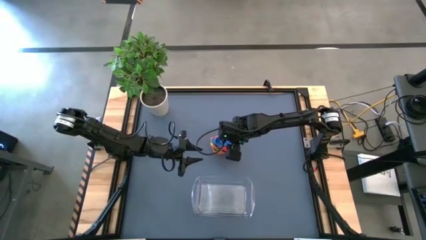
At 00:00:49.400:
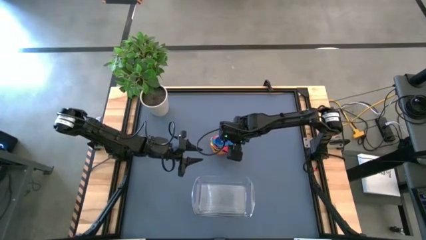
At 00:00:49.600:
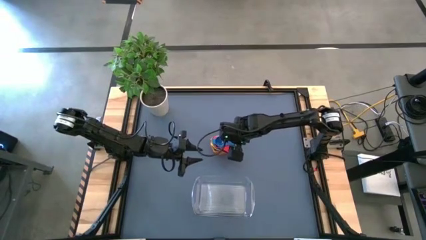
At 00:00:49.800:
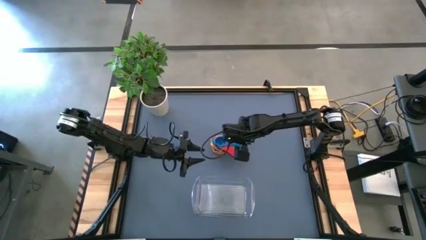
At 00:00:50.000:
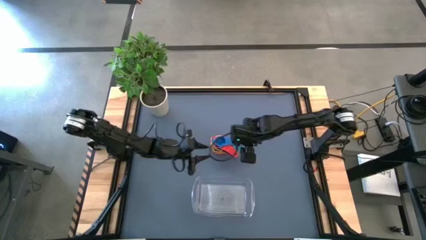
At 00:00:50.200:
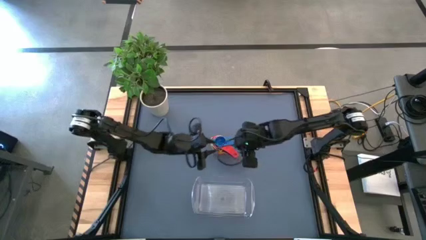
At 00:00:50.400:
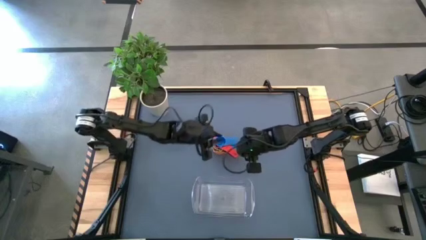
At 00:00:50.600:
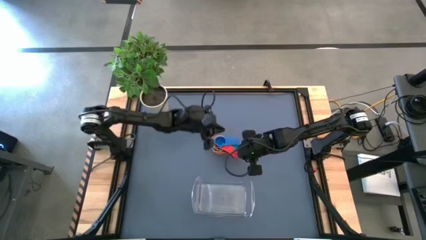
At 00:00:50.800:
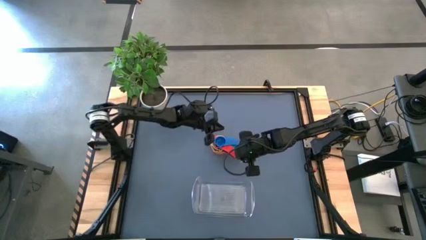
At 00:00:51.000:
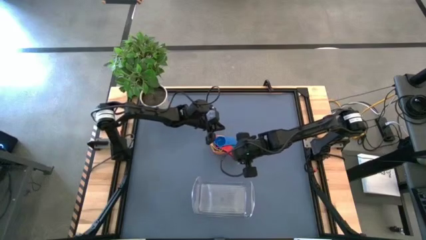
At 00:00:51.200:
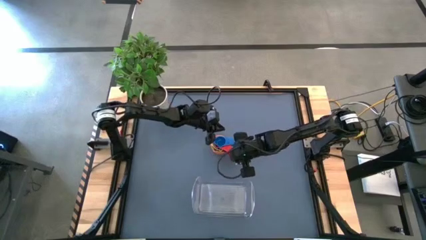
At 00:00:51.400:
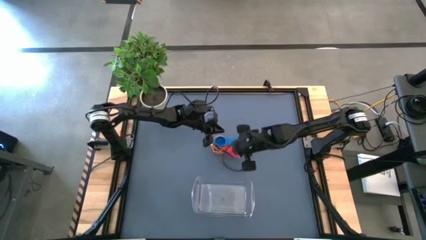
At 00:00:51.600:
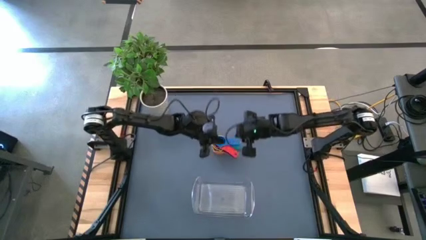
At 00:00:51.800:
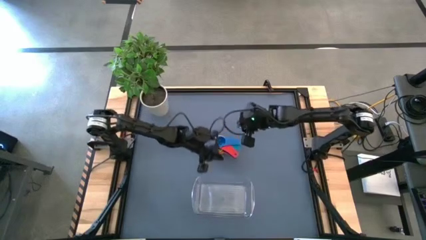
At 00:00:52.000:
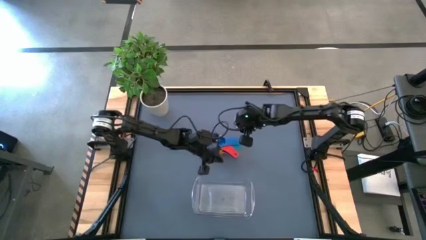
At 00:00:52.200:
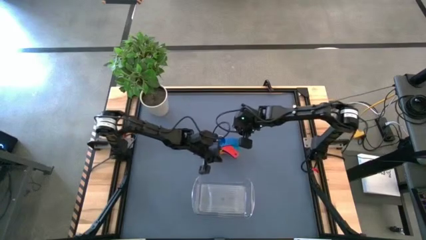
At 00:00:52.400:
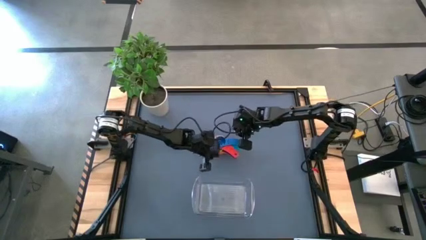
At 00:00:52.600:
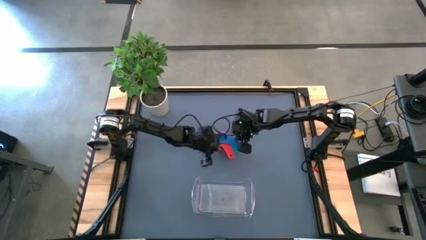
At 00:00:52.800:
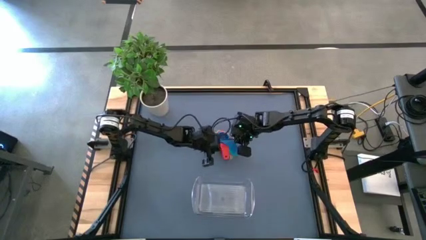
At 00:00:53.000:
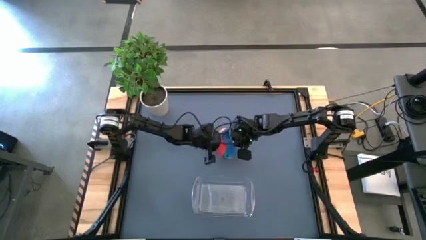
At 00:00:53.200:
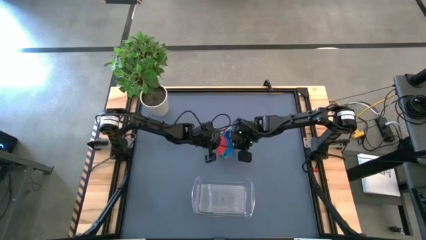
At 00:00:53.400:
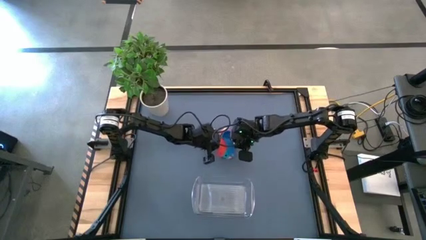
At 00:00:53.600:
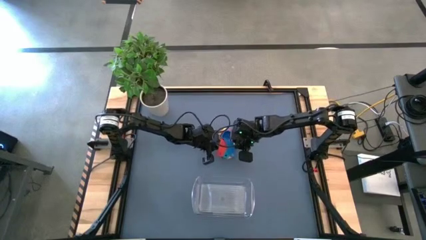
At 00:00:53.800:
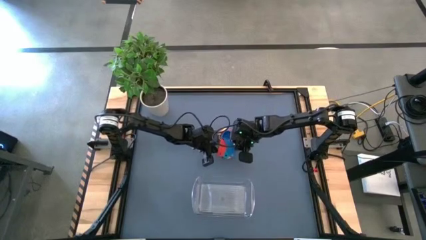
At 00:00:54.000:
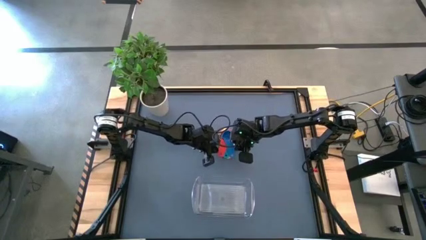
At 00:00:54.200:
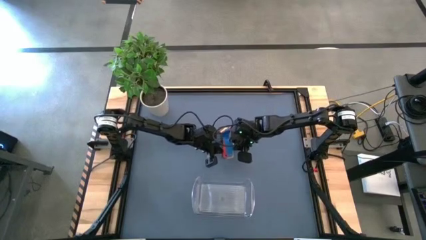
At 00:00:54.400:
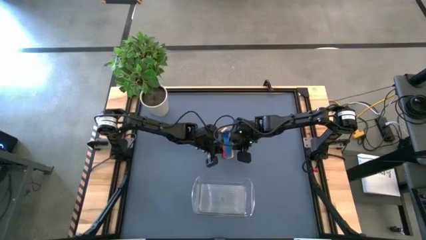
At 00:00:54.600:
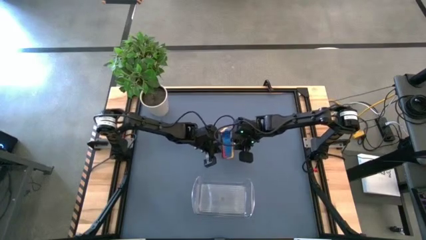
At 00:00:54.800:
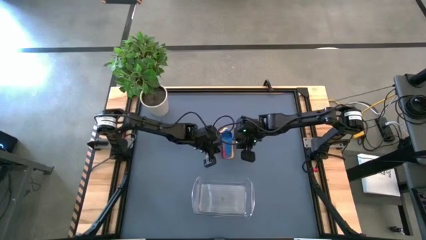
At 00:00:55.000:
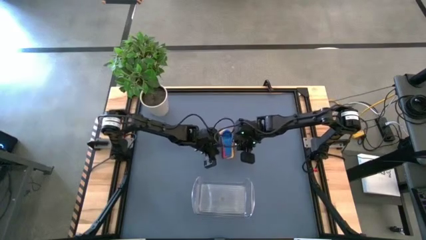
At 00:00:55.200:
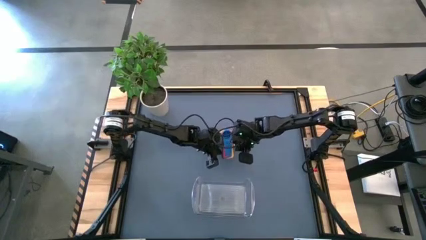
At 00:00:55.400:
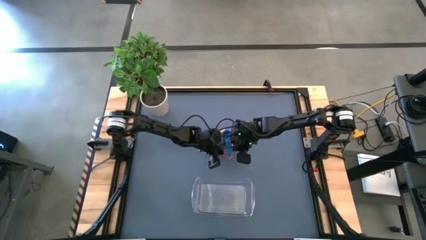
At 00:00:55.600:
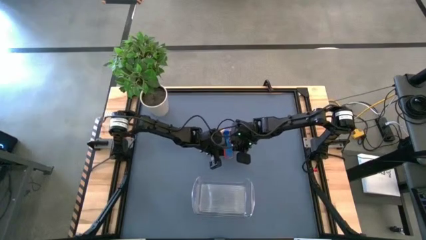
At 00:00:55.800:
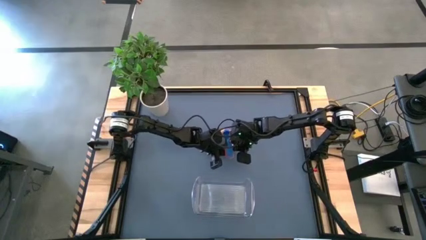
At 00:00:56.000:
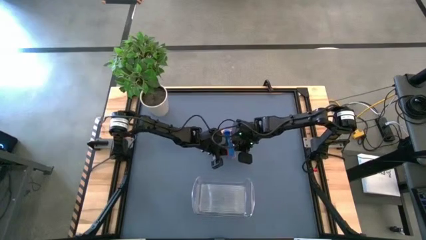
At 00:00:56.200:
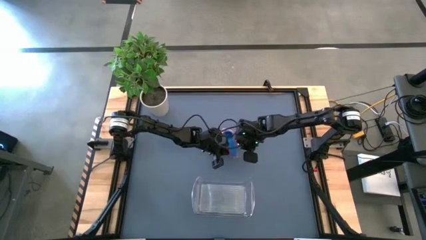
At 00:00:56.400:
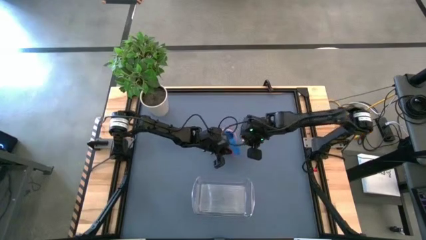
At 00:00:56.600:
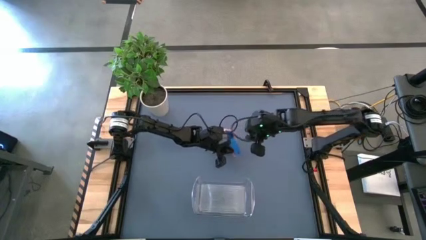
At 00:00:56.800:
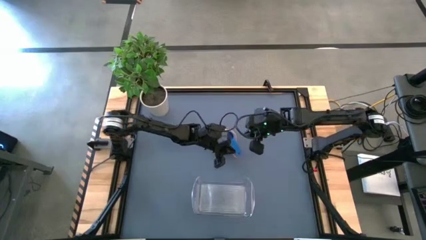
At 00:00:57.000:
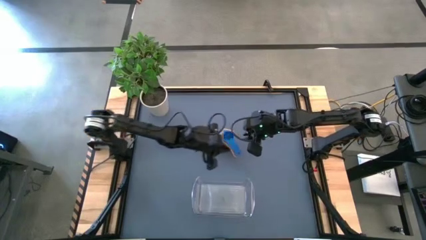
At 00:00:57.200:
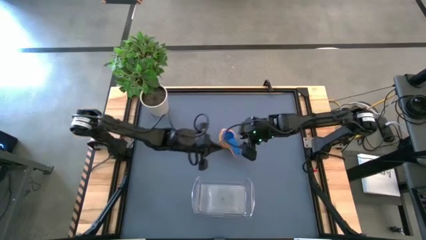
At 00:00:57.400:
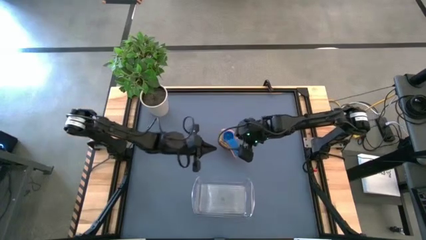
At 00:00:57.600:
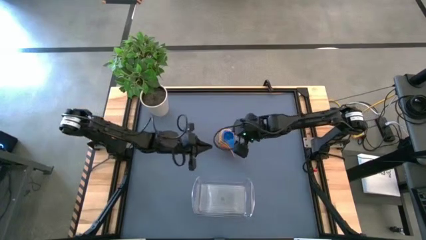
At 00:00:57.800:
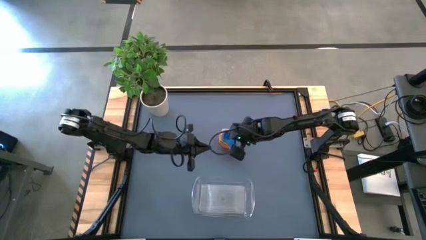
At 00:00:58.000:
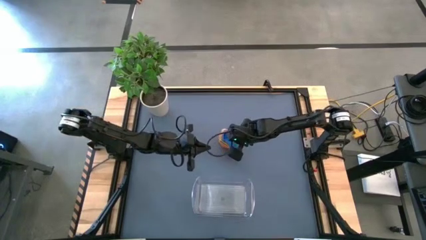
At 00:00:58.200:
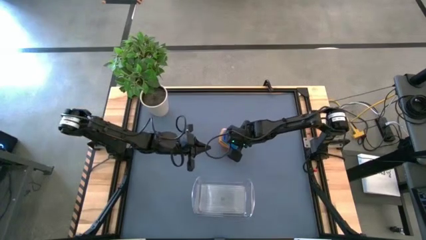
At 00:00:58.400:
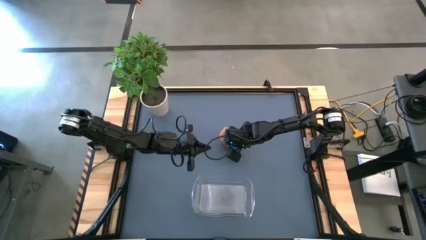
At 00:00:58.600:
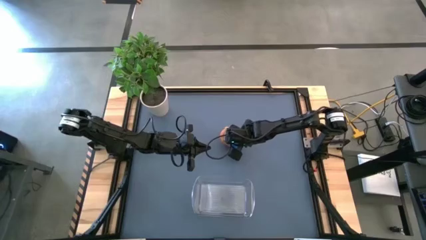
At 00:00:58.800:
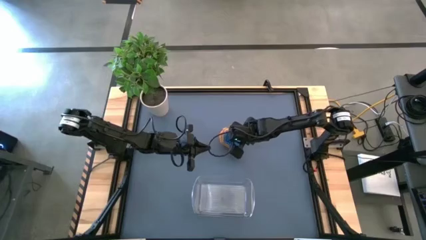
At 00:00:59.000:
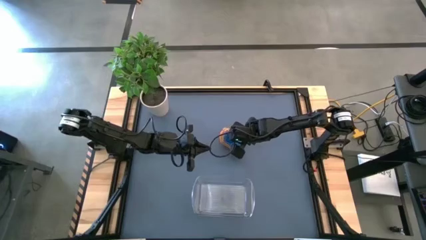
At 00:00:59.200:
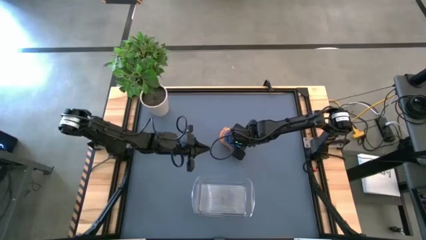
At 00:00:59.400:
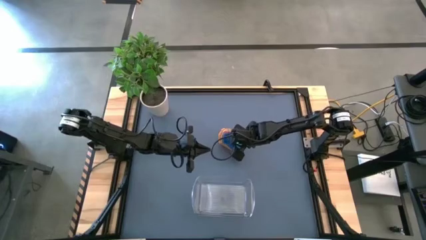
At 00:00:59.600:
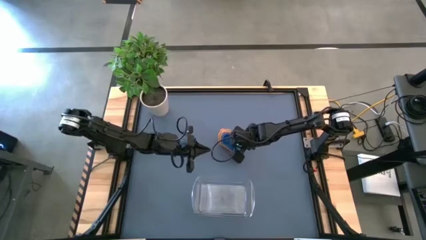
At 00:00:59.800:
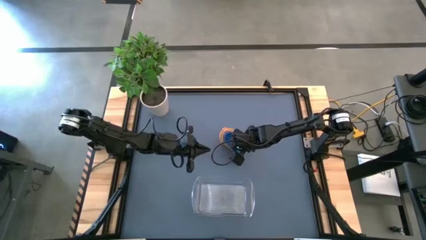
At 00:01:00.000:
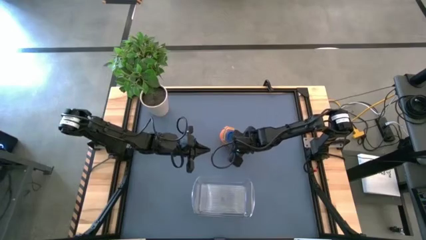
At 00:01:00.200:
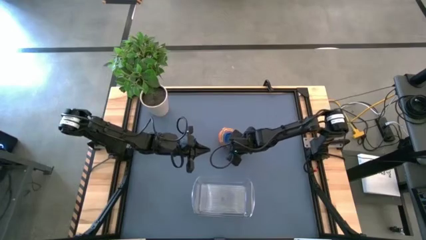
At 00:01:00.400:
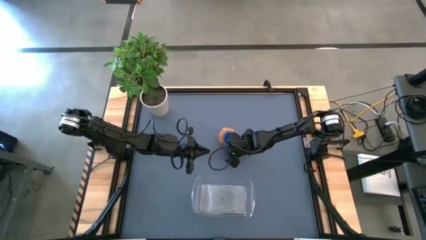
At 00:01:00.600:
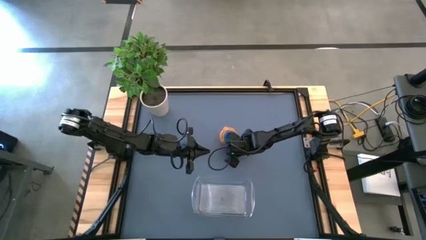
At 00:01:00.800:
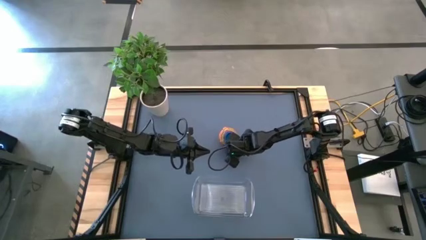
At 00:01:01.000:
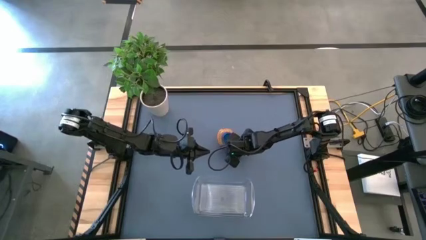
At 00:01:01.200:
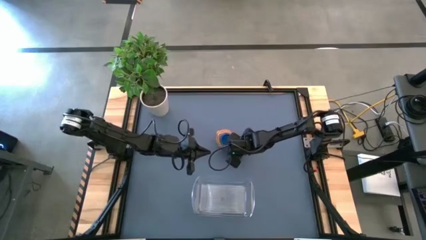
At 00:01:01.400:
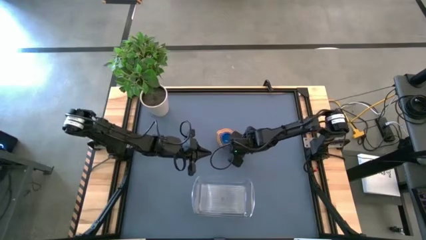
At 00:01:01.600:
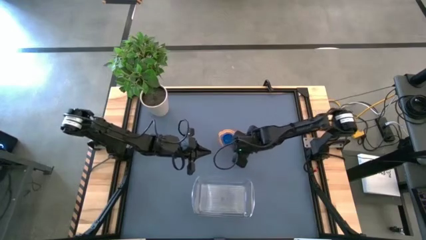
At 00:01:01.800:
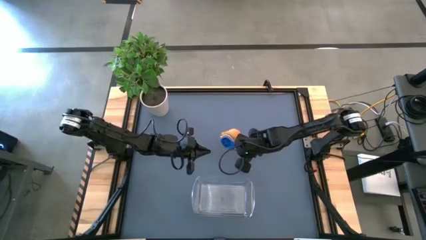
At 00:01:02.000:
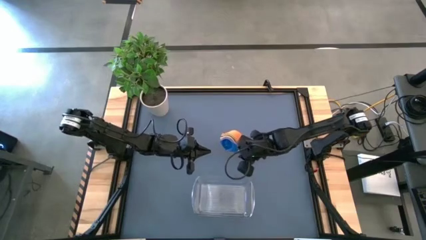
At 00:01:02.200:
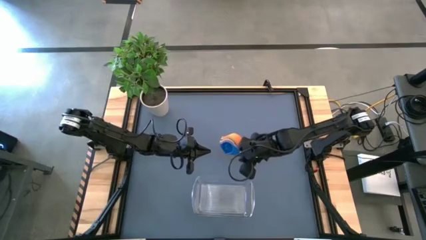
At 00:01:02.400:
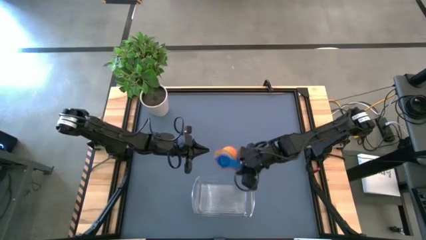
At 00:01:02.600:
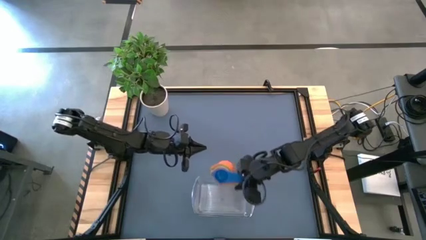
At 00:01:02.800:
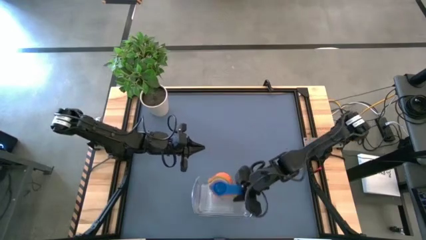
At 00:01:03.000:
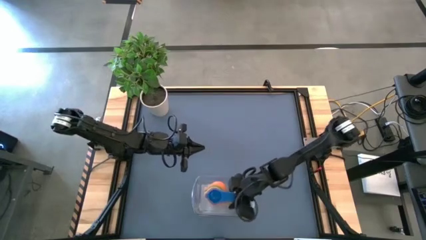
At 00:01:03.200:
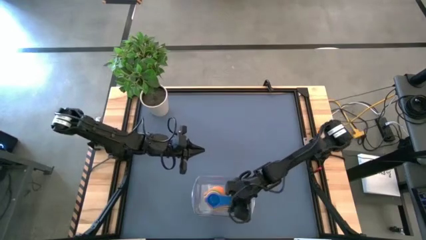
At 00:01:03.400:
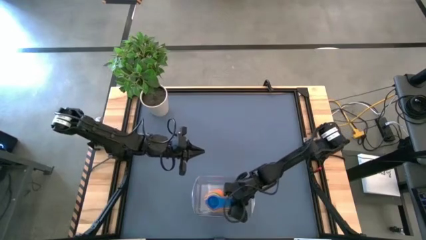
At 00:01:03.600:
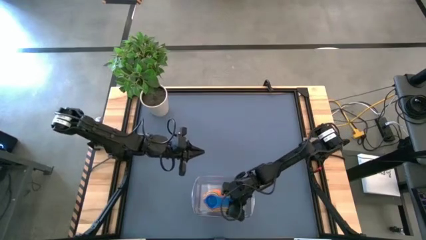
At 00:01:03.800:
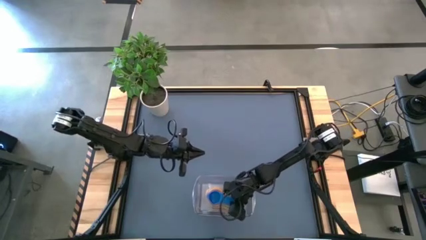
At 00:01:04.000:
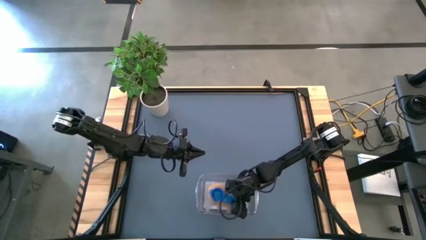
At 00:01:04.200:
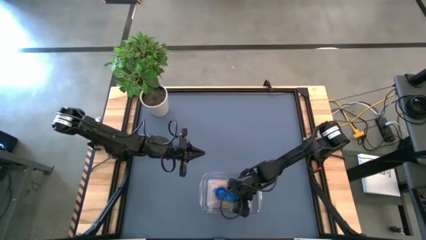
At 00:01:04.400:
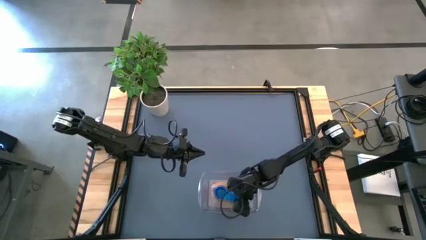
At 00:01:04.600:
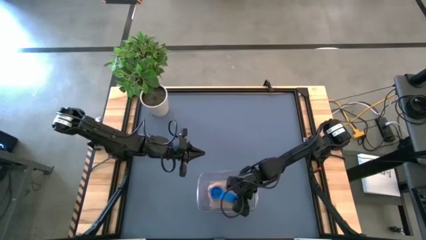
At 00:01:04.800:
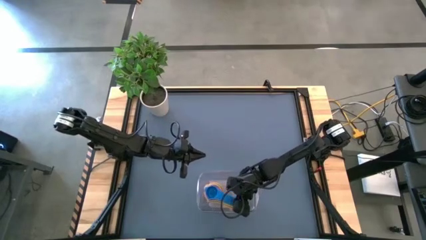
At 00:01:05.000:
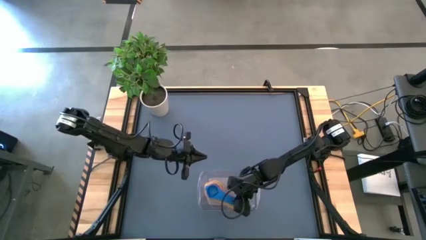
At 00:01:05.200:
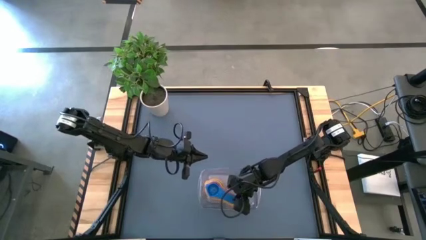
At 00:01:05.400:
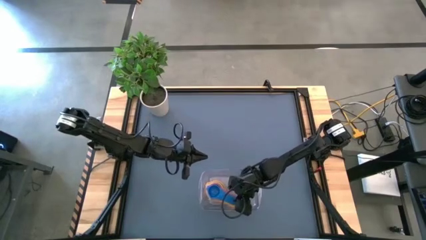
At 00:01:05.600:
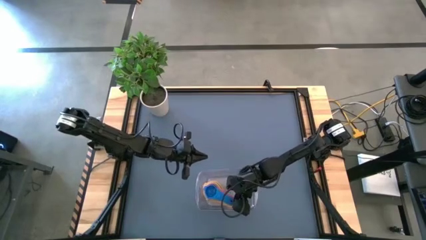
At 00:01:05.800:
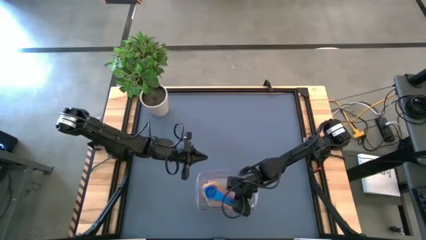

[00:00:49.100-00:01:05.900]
Task: Nest measuring cups in basket
Put the nested colored measuring cups into the transparent bin
